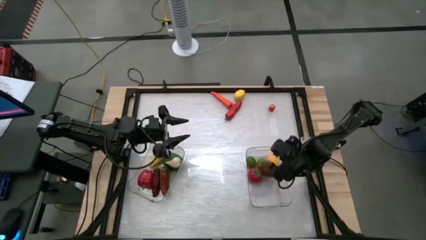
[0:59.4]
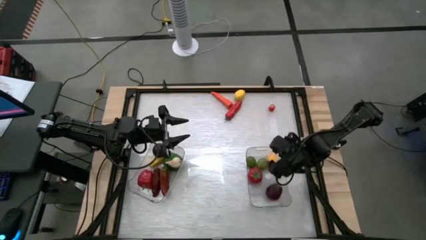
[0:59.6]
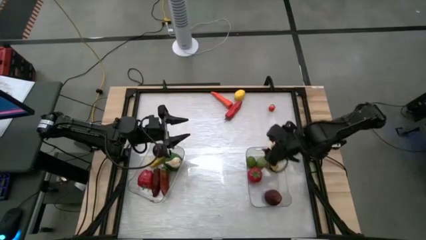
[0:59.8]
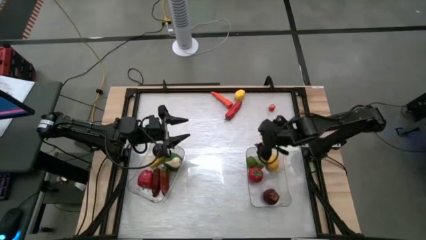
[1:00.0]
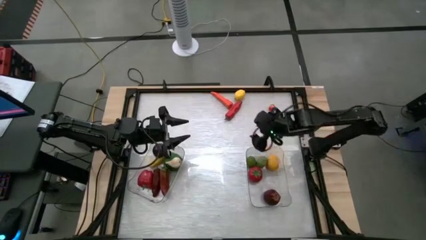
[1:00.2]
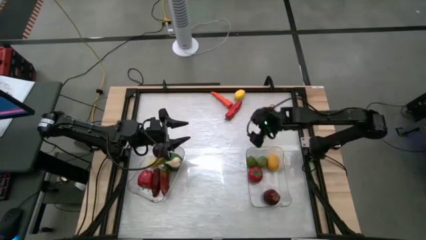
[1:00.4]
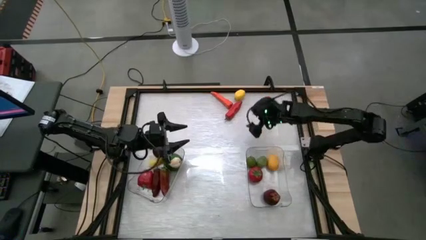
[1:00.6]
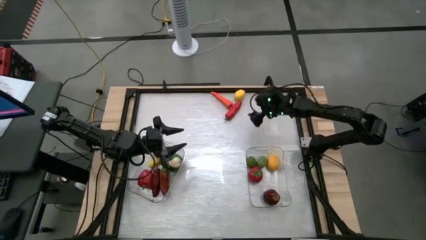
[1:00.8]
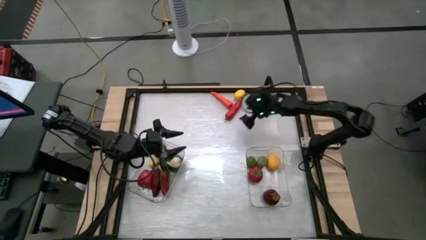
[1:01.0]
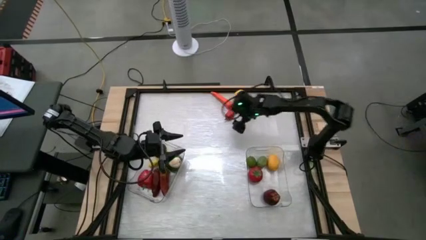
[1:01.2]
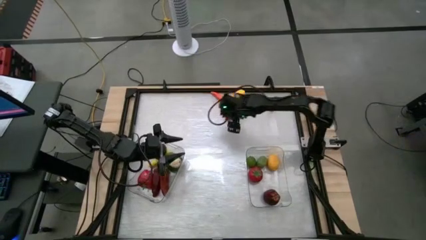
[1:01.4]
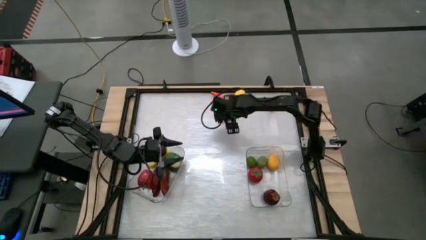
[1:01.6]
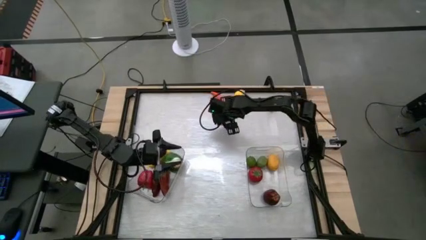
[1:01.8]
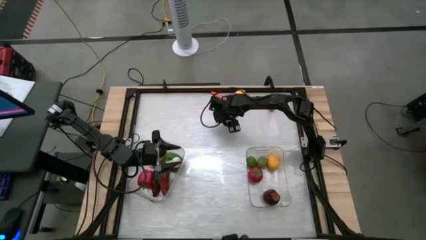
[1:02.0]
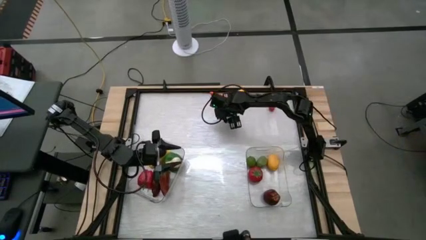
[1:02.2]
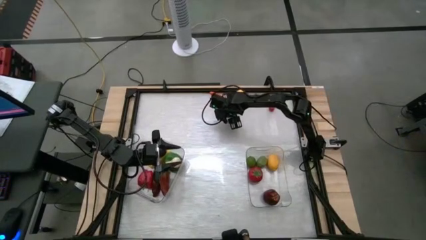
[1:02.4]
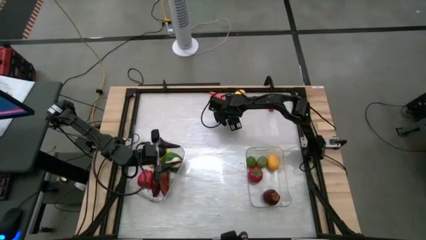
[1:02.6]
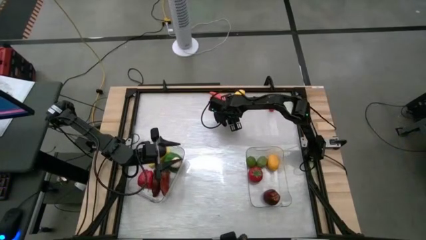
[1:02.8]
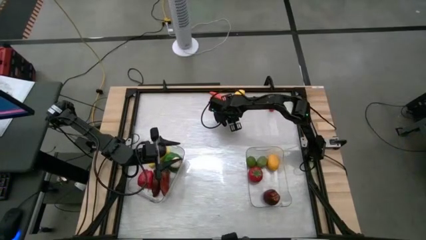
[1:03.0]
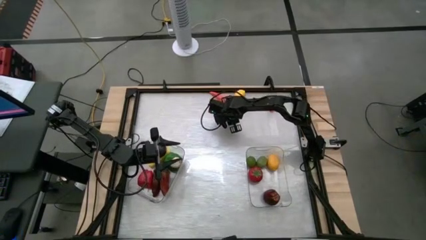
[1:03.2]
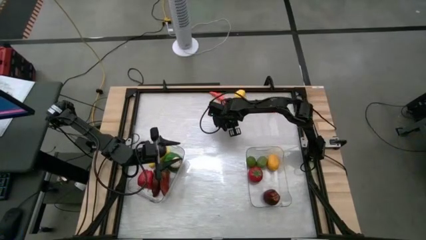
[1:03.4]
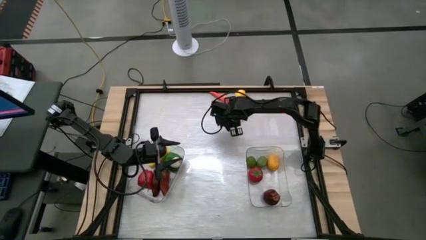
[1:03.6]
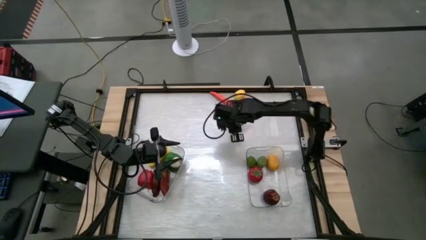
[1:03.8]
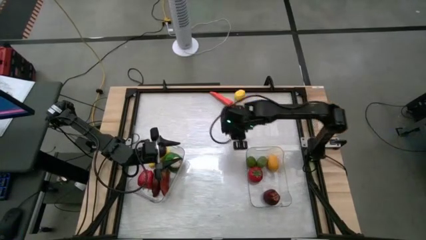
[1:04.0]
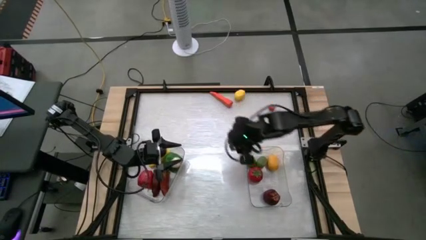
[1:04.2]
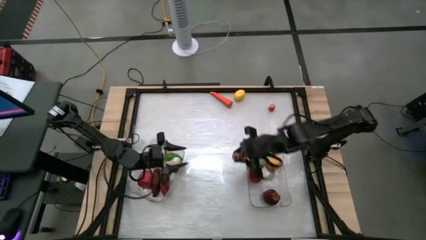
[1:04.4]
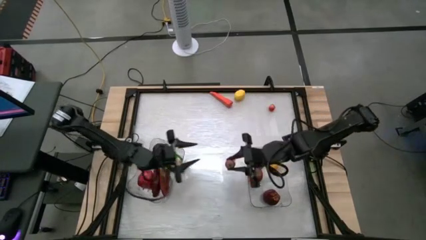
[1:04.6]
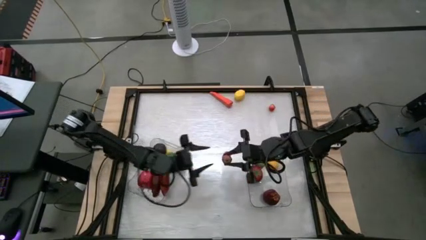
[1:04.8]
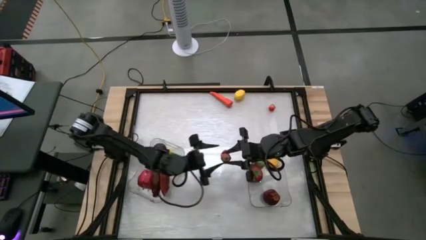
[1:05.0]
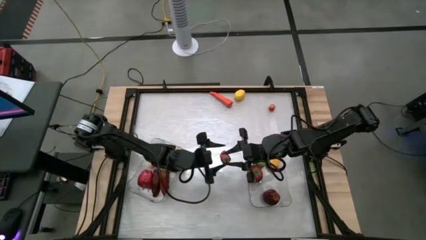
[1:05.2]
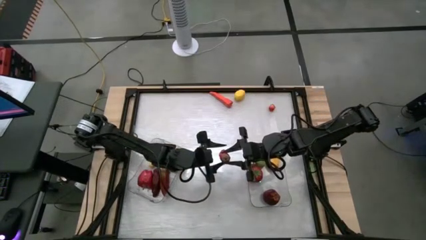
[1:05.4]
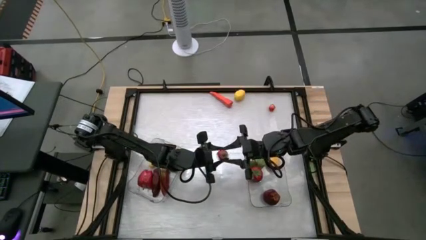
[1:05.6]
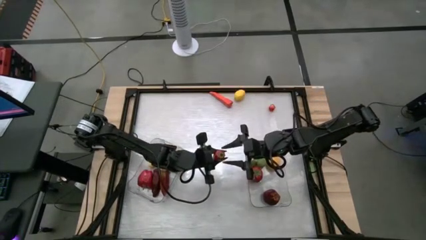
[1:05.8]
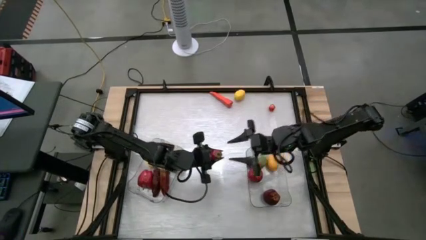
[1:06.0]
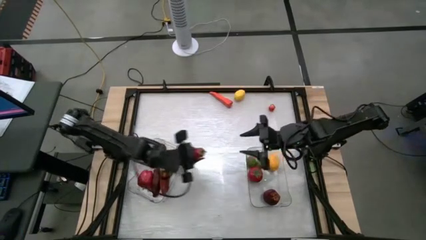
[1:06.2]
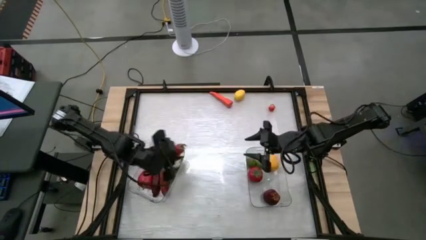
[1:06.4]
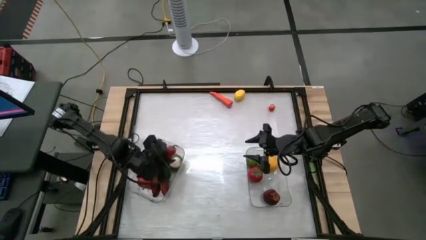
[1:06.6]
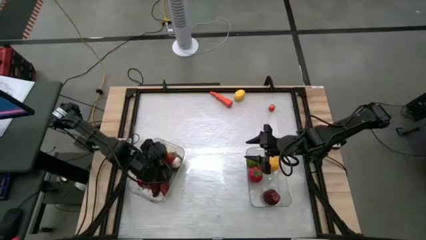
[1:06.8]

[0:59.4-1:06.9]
Task: Sort produce into baskets
Put the red chili pepper into the left transparent bin

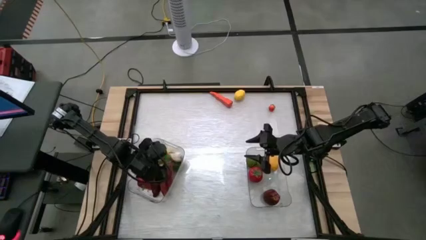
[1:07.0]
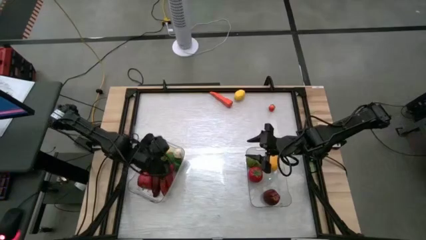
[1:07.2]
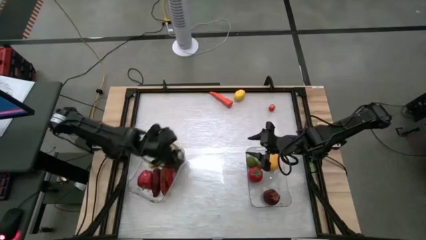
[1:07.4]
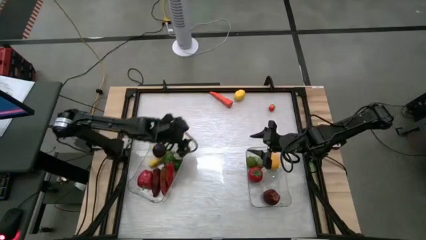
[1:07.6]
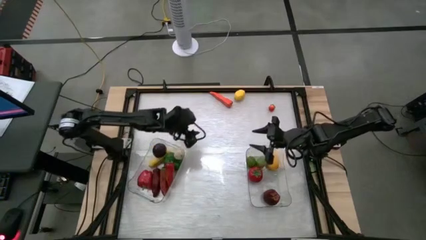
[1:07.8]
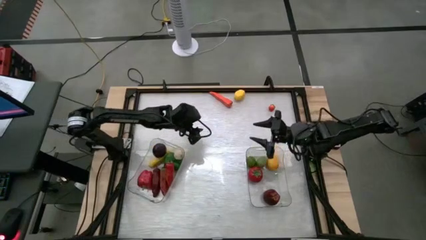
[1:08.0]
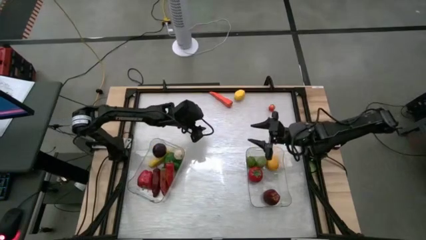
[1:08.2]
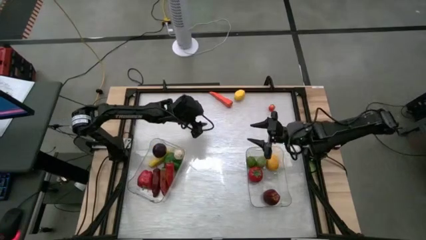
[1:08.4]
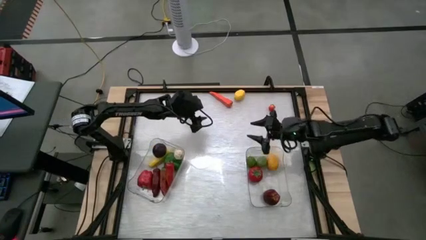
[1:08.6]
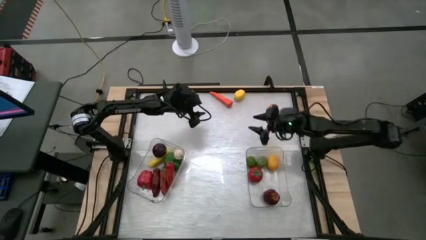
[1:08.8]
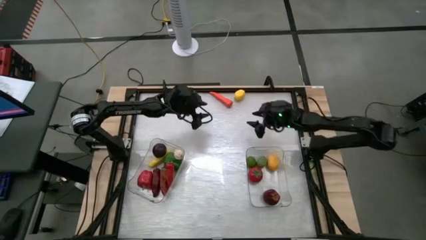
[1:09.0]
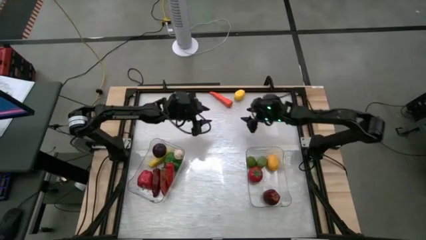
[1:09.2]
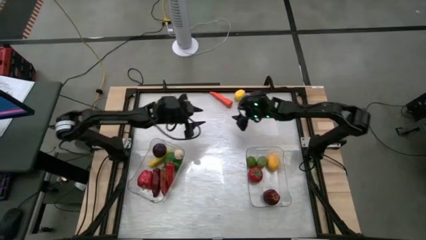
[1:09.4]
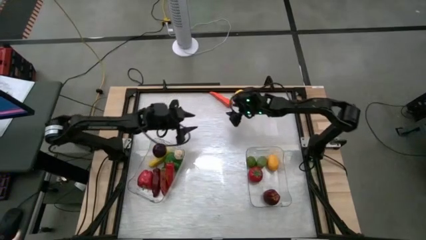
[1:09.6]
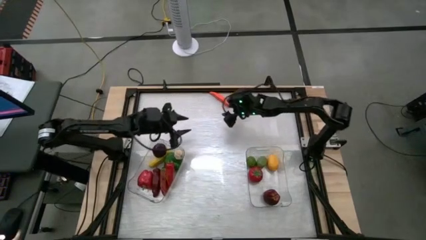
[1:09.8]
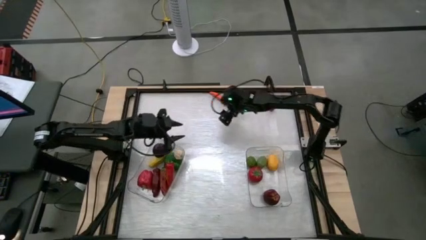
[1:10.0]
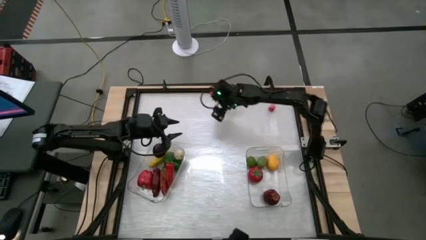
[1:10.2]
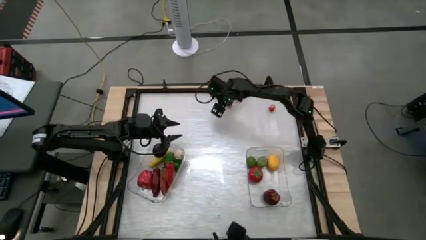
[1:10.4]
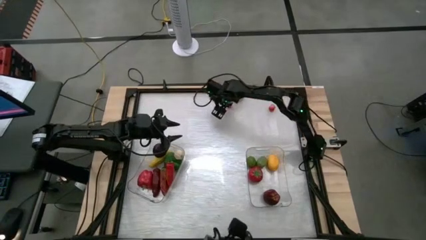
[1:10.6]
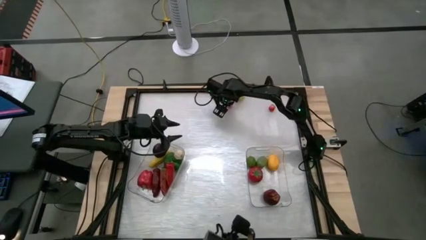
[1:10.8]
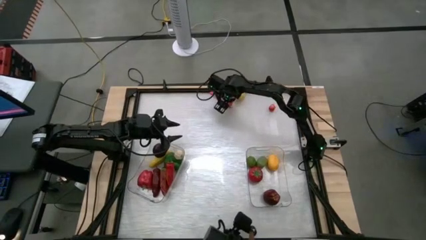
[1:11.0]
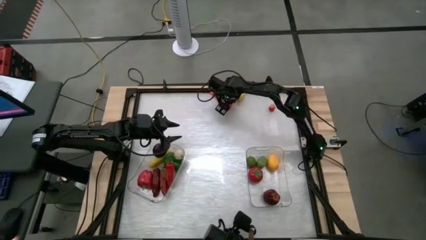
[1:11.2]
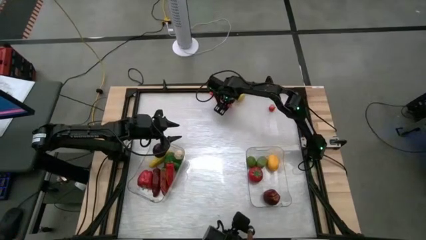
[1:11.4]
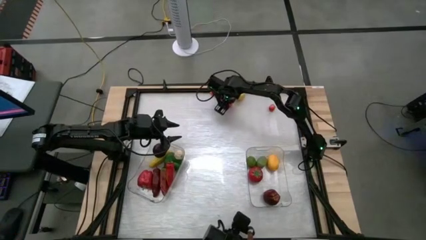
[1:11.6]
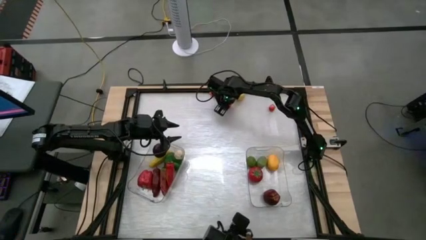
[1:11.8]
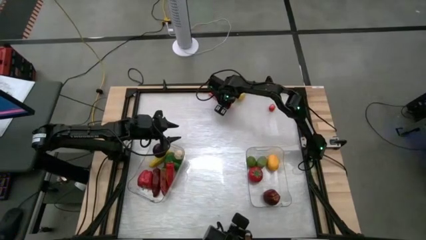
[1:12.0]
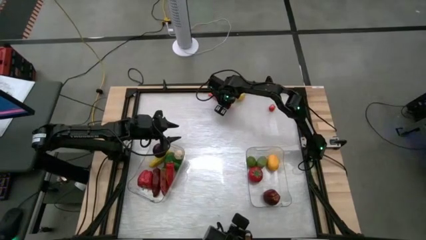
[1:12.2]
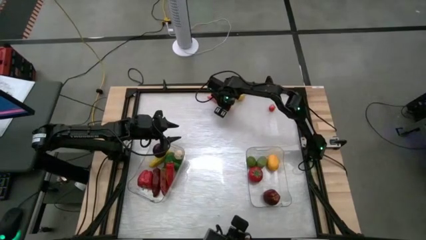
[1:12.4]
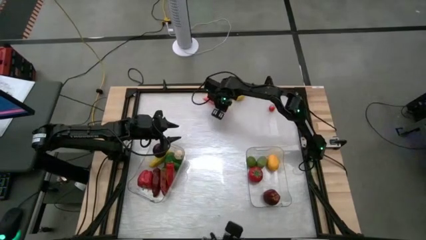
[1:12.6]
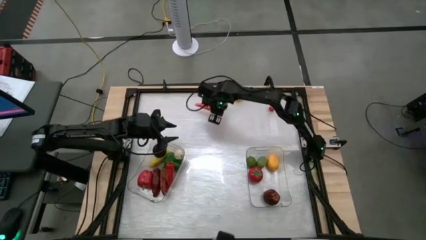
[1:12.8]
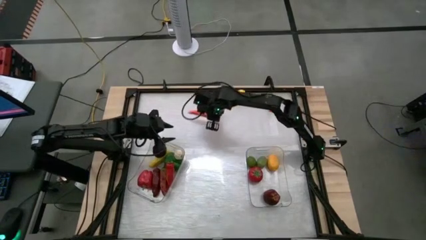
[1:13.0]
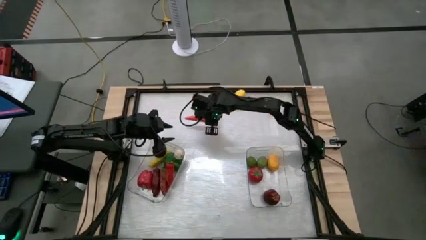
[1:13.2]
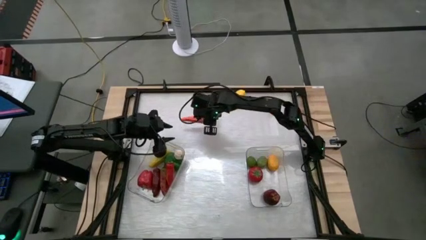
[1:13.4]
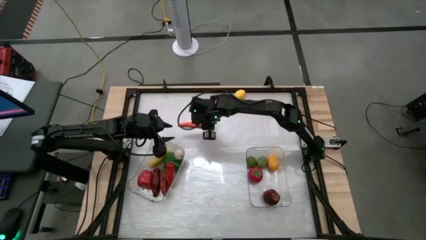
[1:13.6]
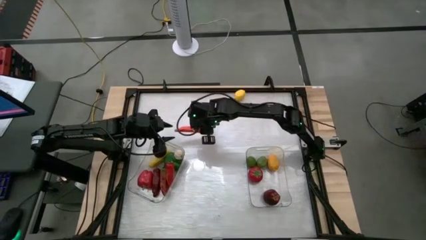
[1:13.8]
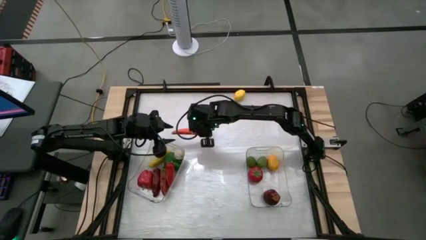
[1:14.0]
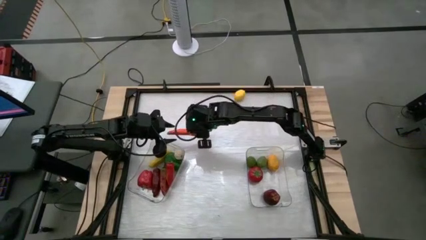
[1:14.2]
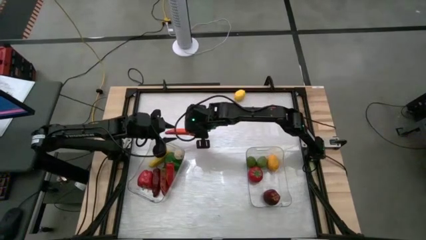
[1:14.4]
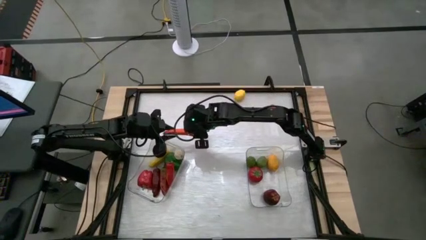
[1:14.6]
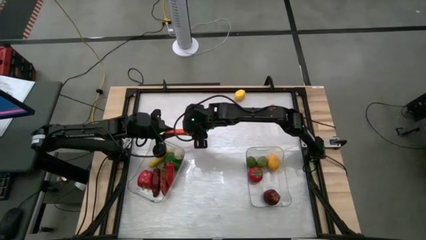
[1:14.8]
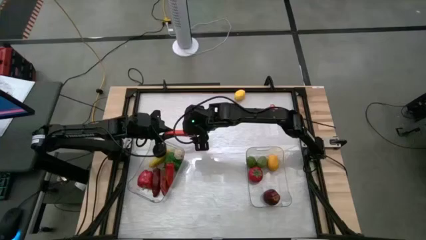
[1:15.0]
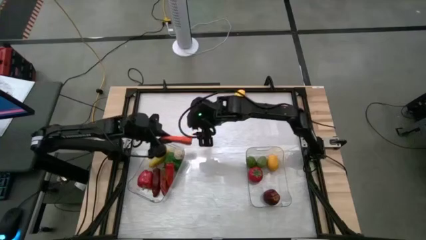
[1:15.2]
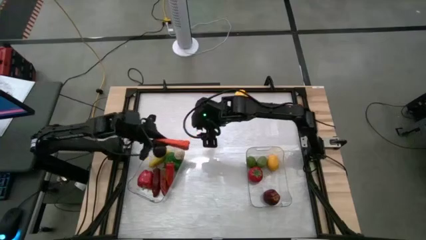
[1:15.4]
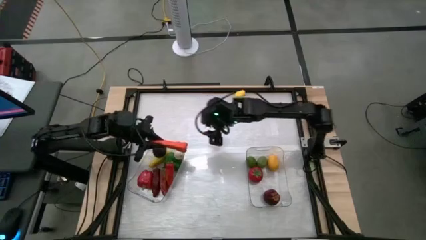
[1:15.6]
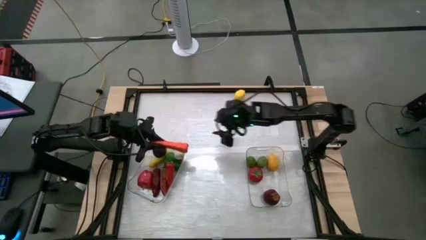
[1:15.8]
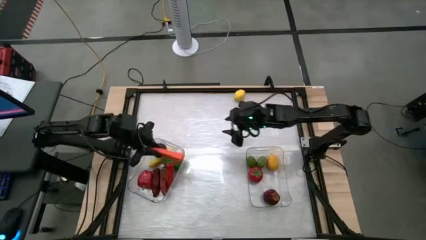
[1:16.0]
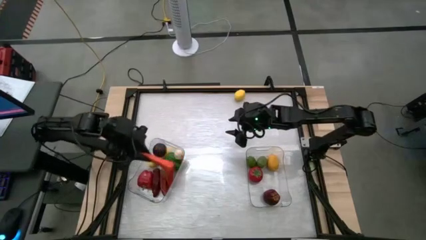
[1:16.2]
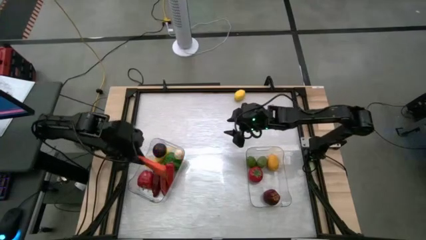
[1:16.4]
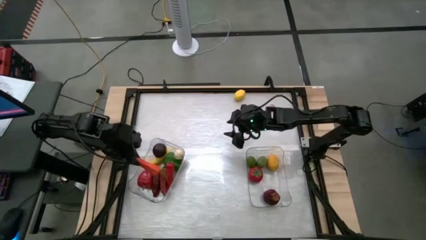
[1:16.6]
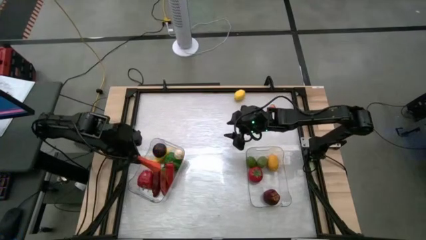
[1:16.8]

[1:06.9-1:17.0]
Put the orange carrots into the left transparent bin
